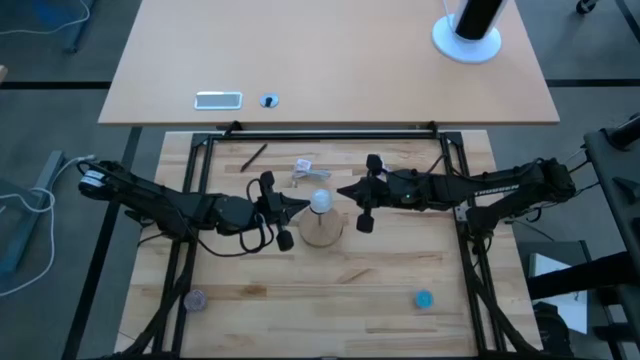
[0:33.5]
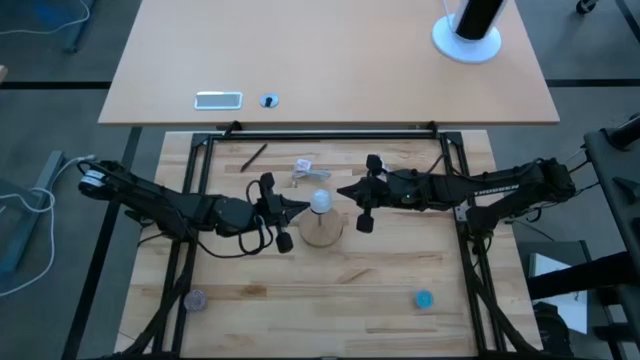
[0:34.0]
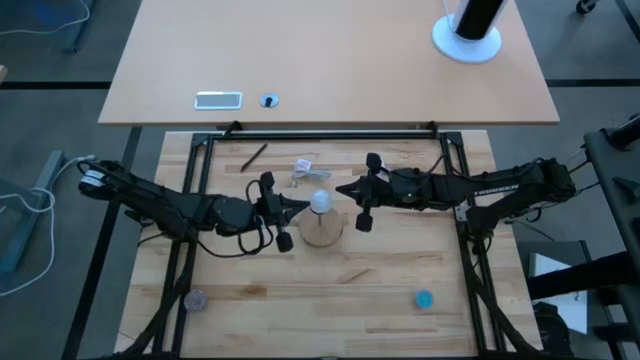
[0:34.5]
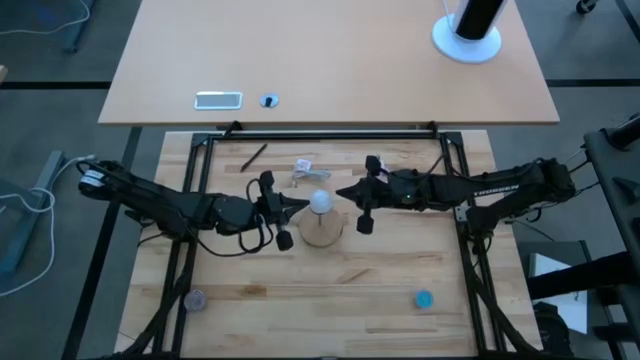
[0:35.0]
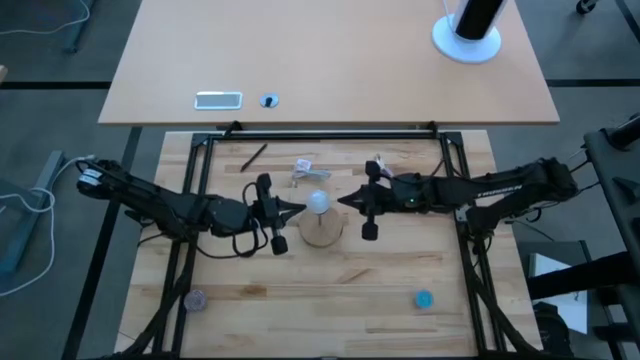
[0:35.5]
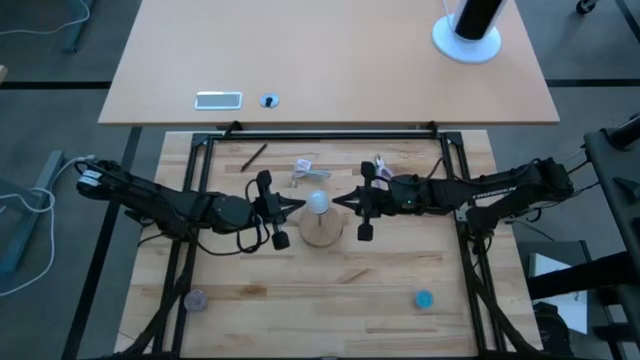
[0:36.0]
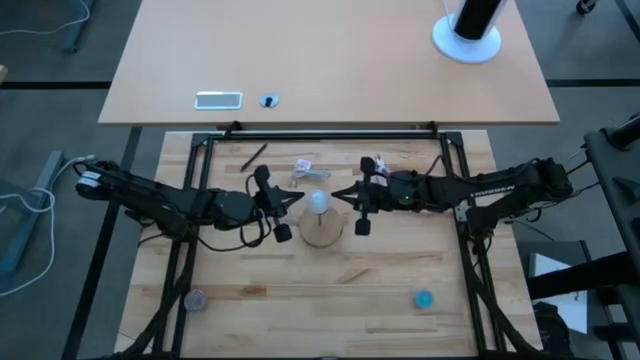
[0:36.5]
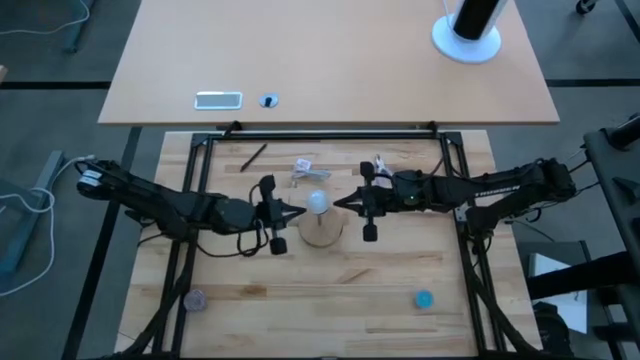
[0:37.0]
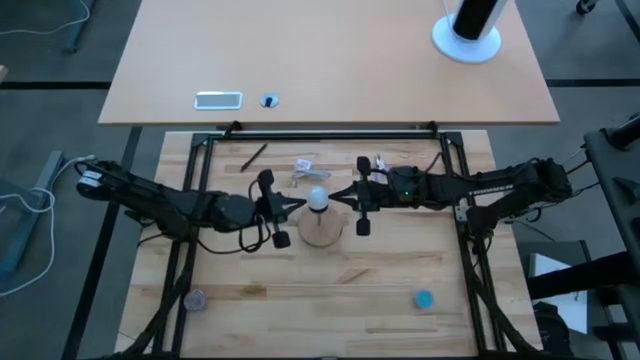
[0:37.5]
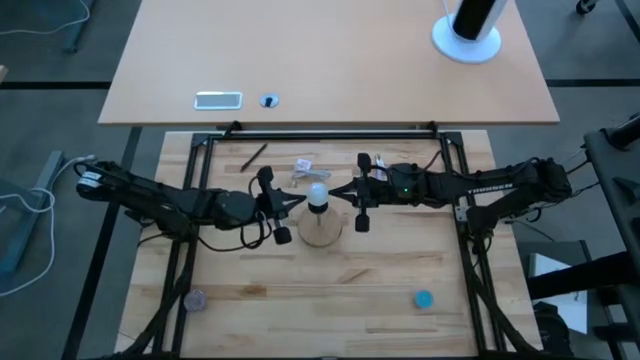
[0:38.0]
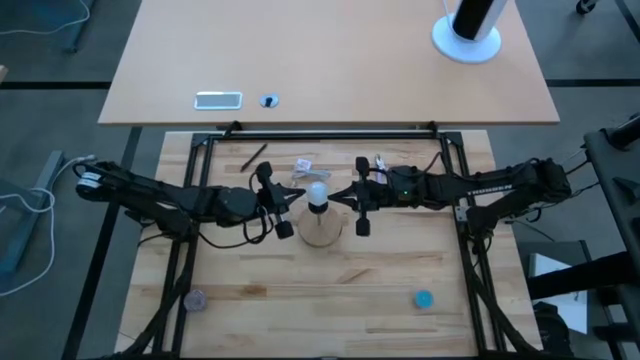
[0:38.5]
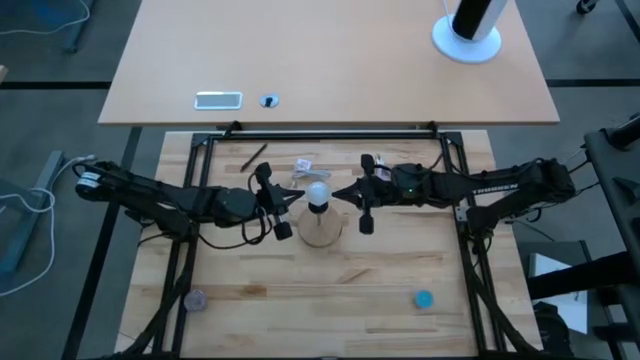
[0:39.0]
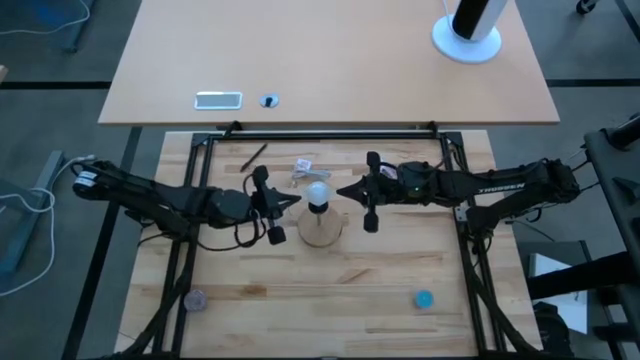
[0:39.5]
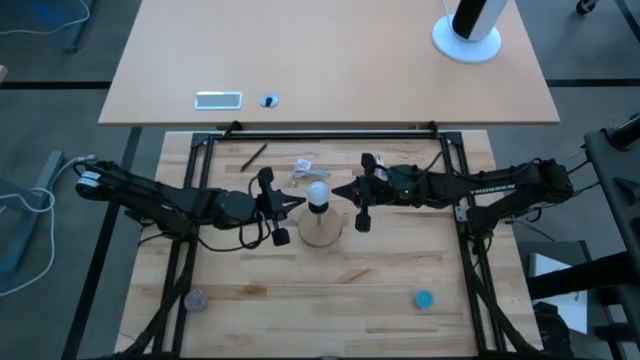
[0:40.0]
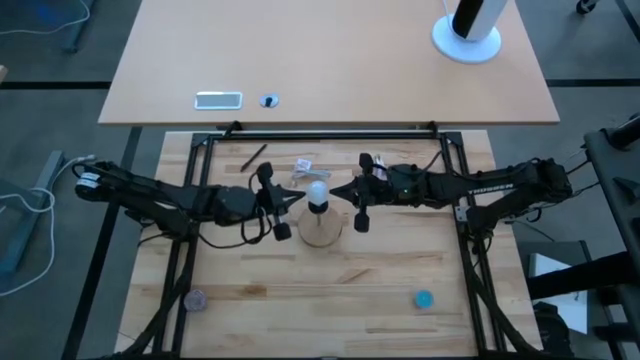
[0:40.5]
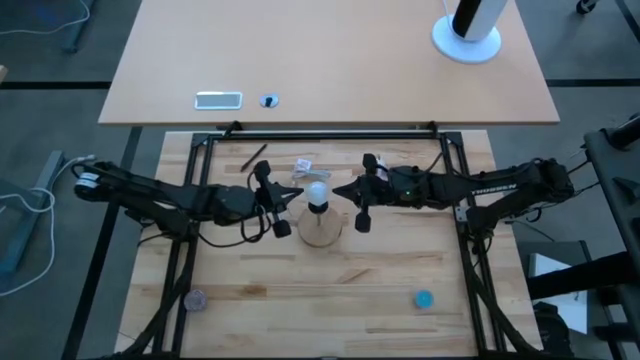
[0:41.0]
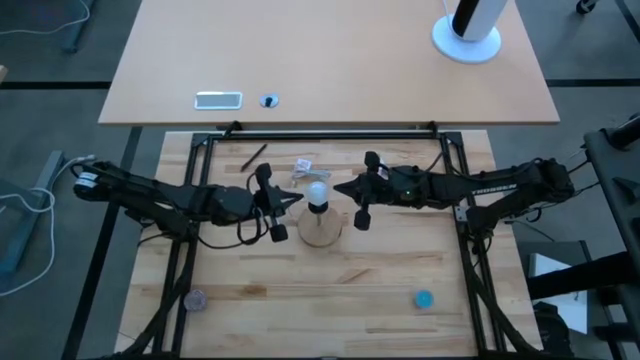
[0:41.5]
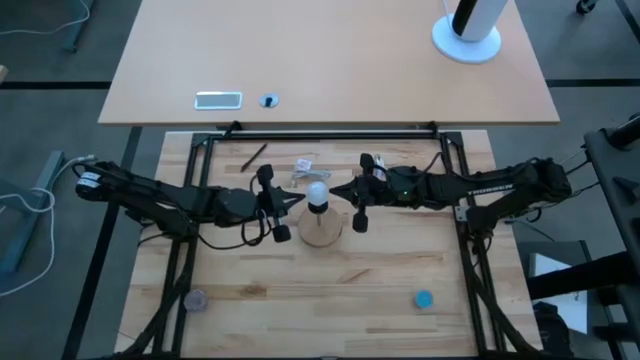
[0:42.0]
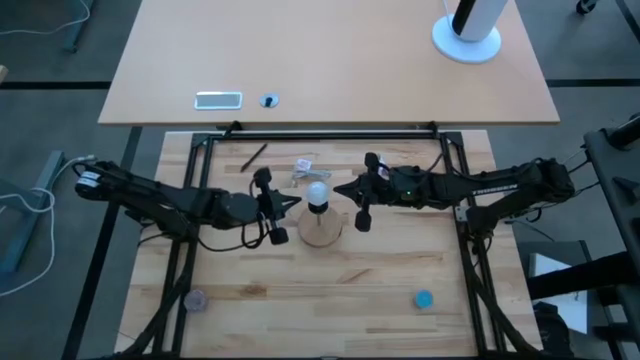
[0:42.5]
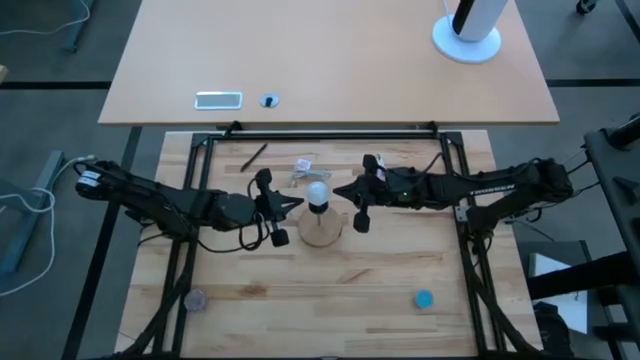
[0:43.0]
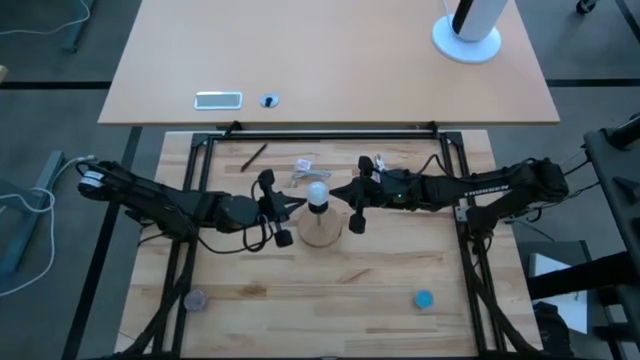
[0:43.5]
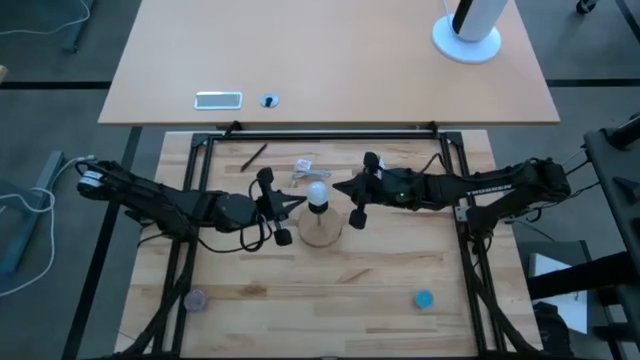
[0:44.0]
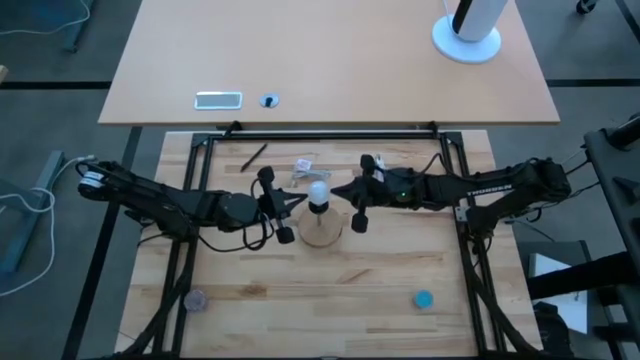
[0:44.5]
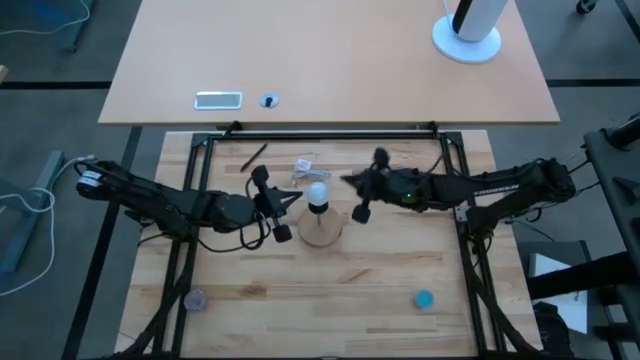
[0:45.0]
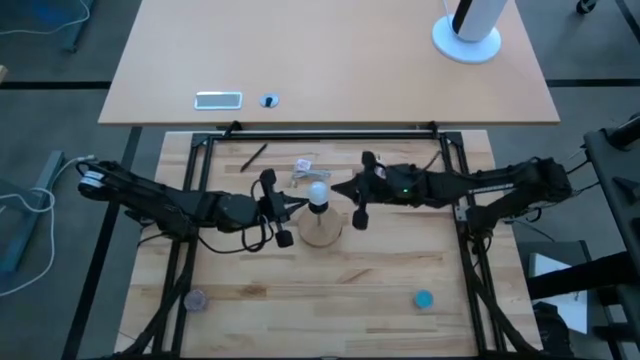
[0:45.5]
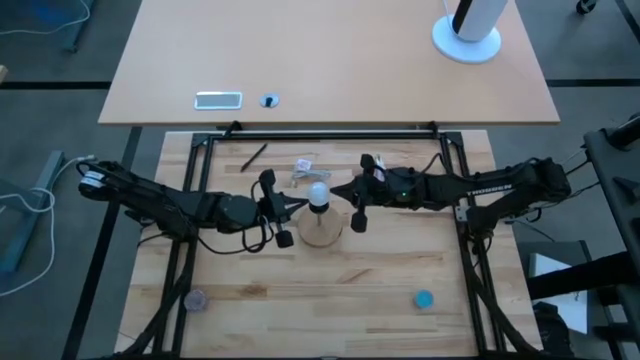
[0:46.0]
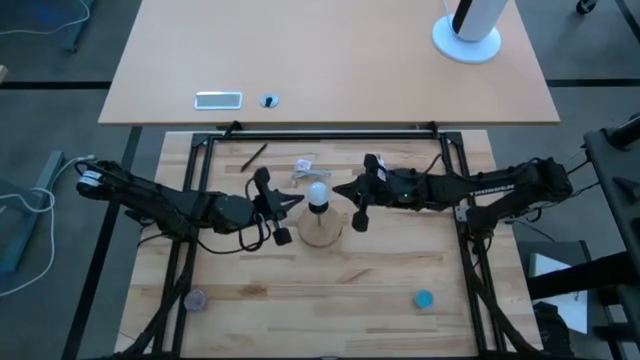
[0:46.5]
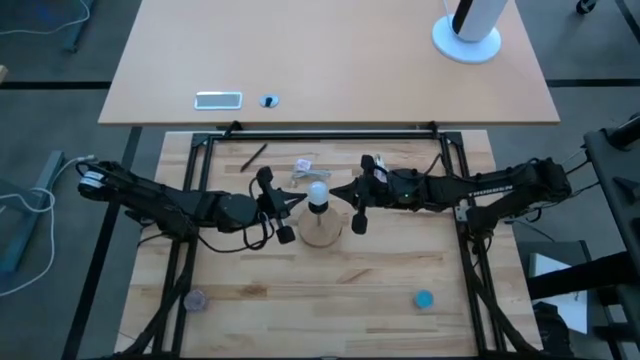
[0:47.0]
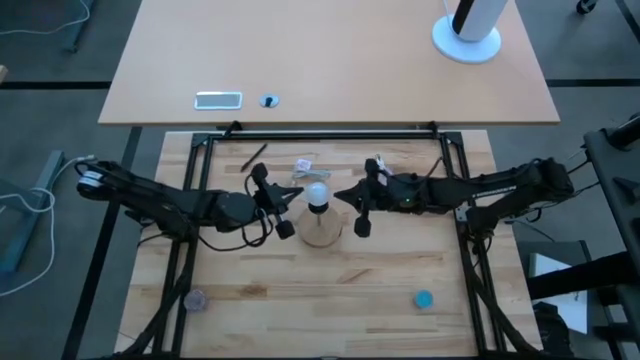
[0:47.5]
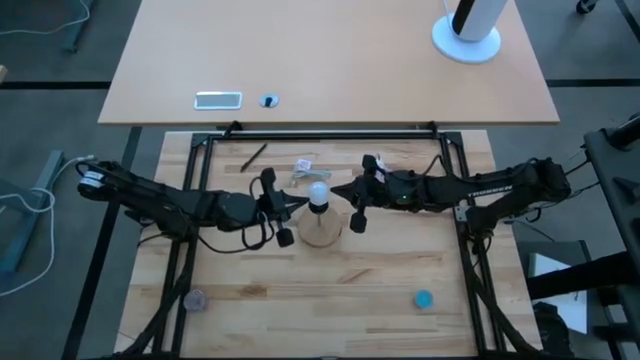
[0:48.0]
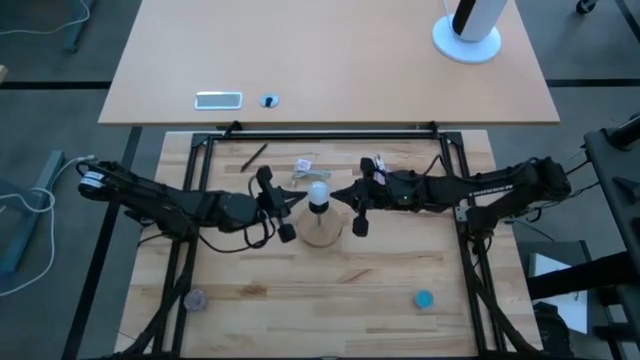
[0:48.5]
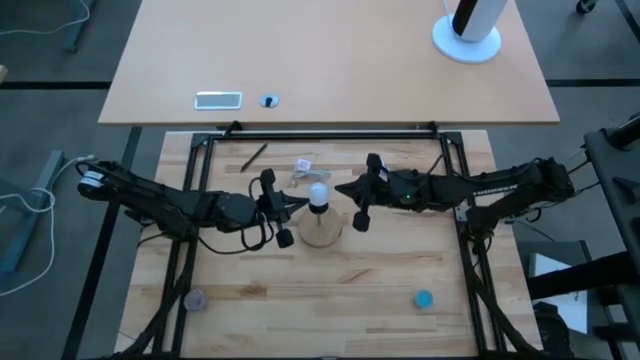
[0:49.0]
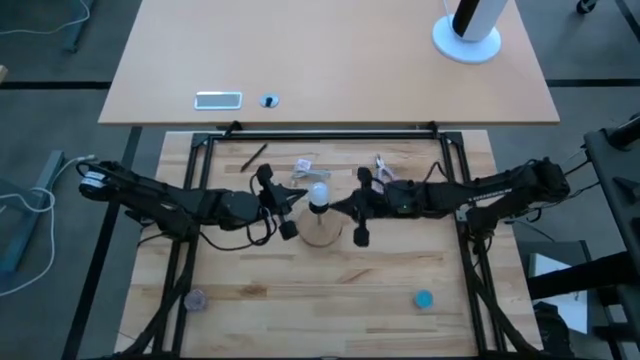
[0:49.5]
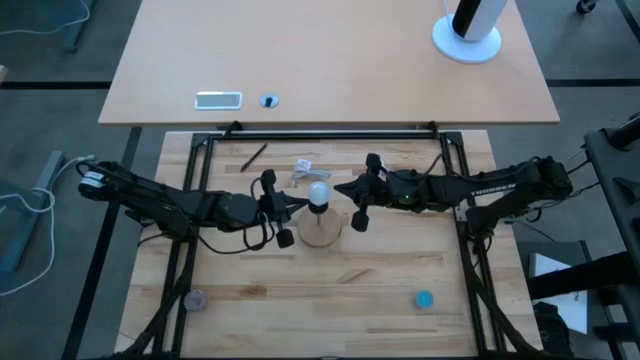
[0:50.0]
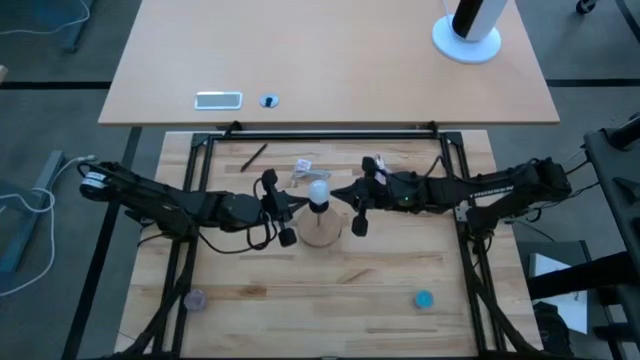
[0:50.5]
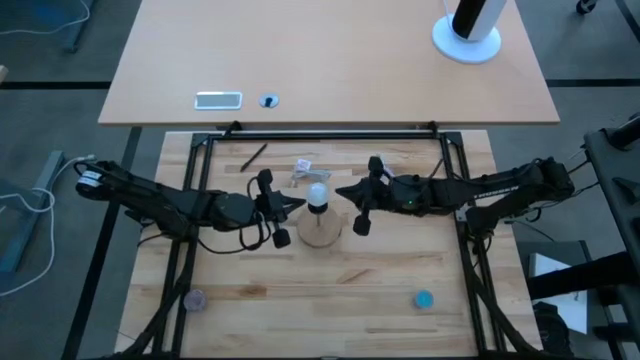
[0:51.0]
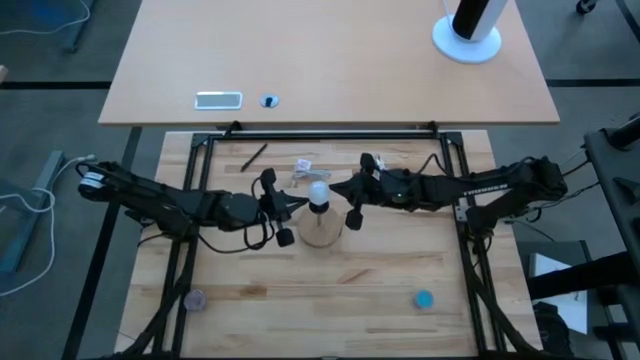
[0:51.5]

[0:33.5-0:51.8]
Task: Screw lightbulb
Insert the lightbulb into the brown lamp

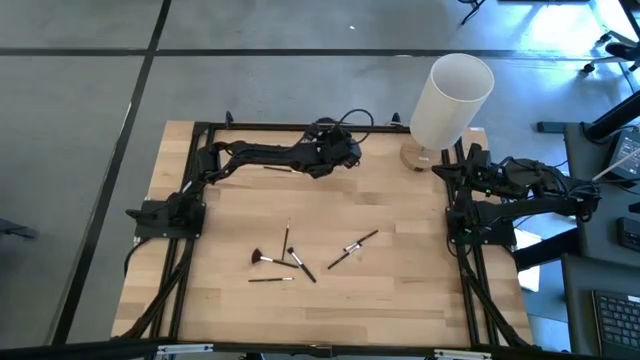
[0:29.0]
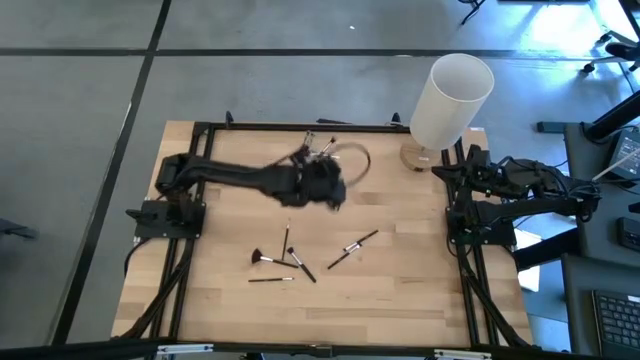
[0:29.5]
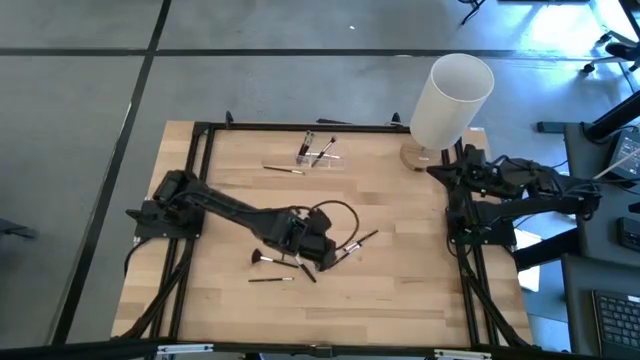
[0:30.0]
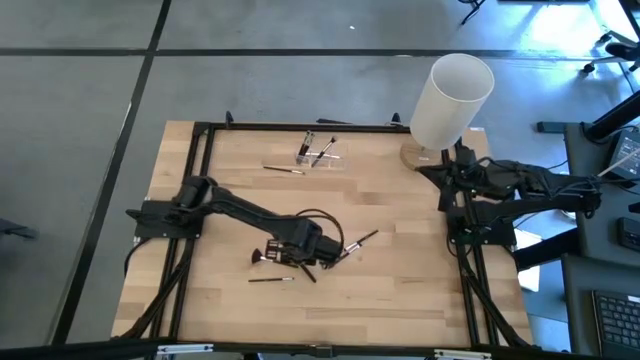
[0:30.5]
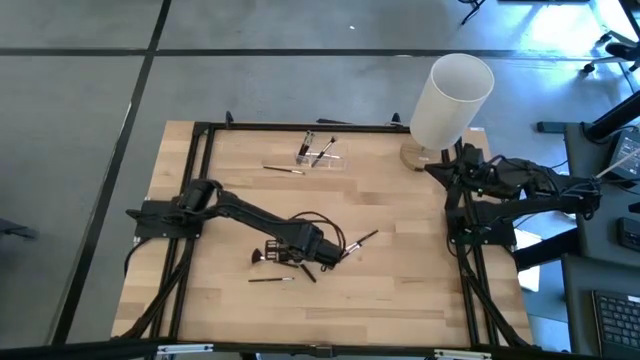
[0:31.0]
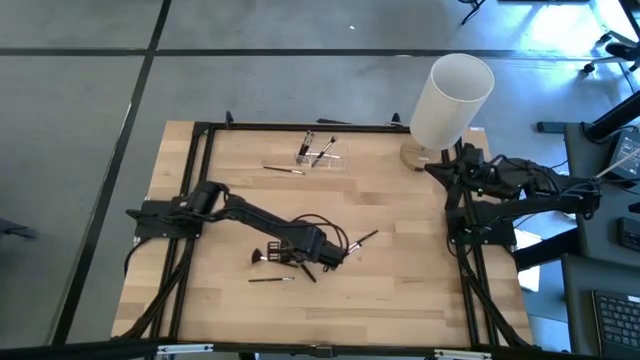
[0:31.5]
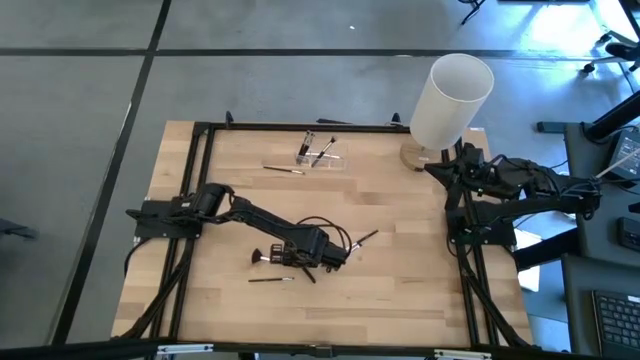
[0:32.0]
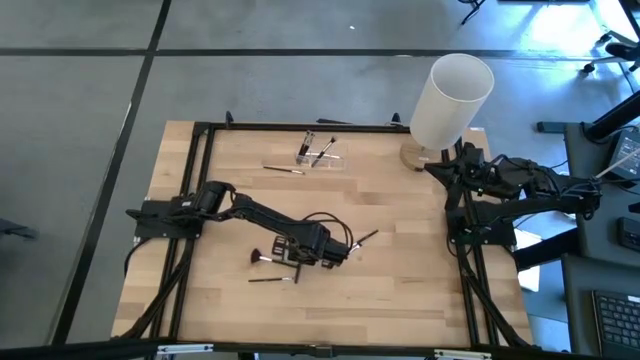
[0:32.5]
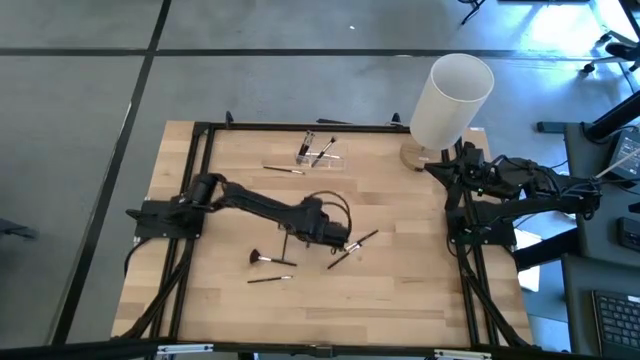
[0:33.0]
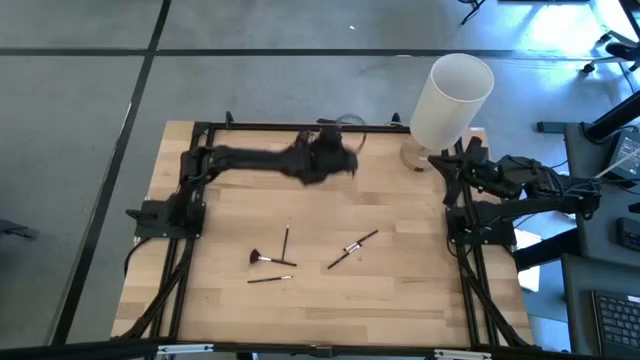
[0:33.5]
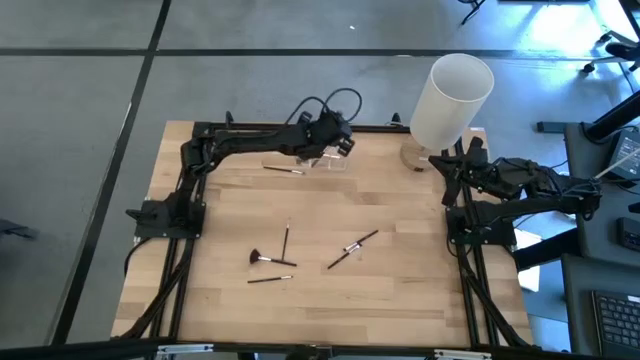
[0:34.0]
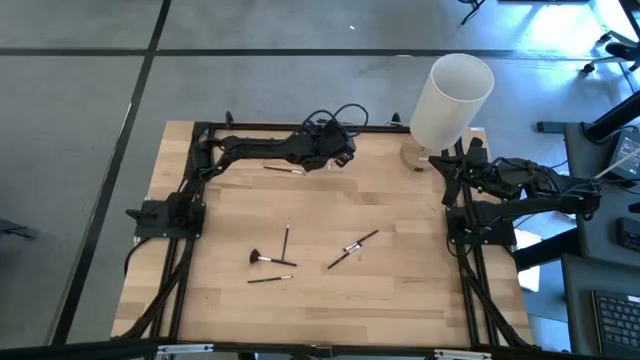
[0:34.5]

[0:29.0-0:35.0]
Task: Pick & Place Makeup Brushes
Put the powder brush into the transparent organizer
